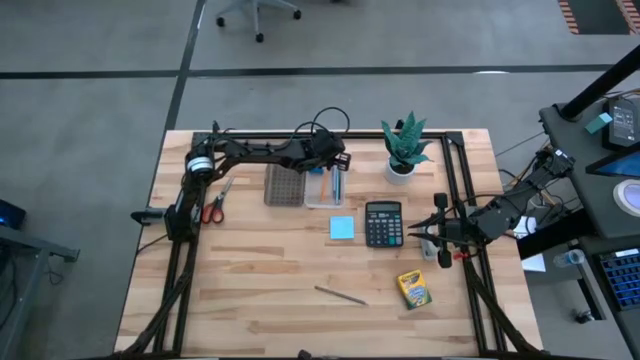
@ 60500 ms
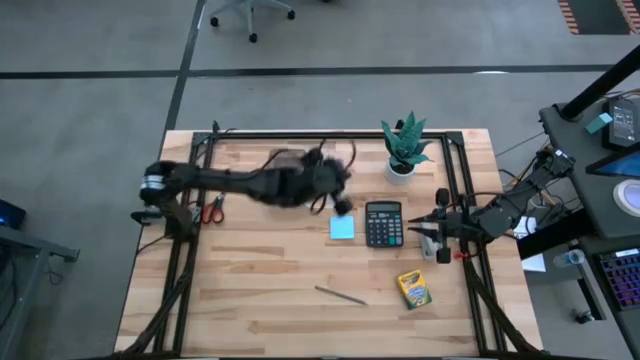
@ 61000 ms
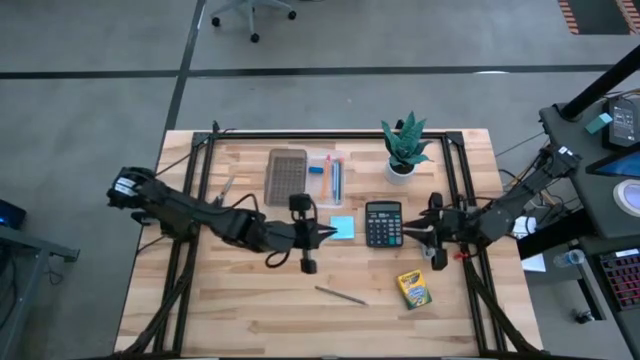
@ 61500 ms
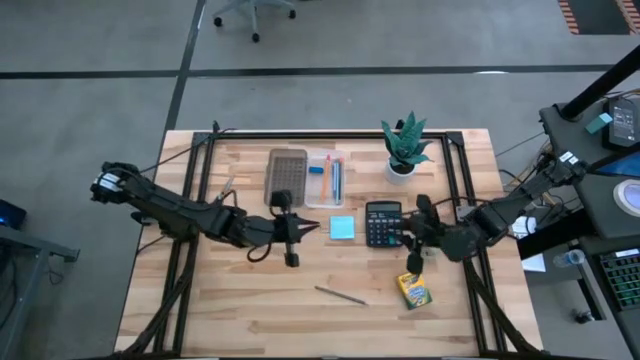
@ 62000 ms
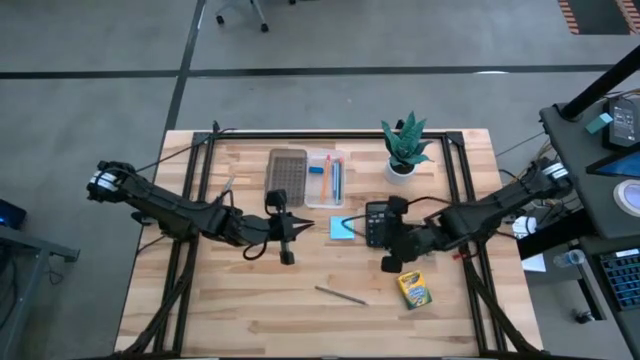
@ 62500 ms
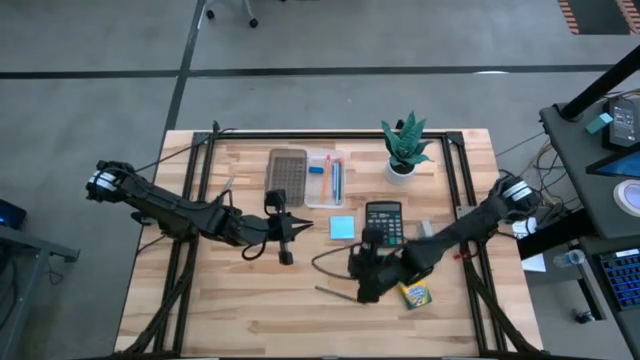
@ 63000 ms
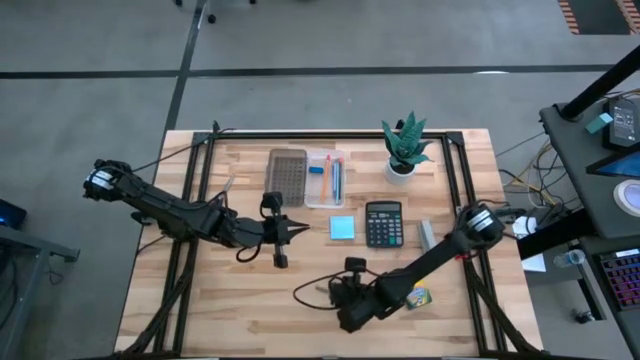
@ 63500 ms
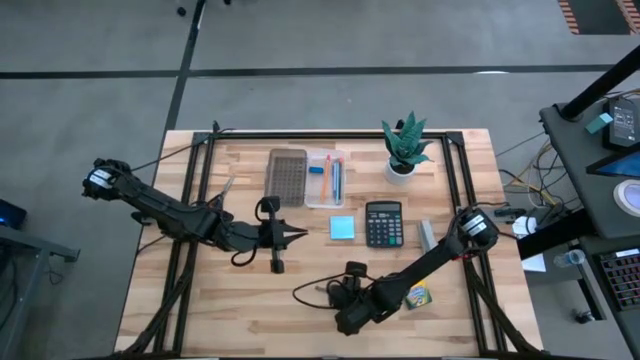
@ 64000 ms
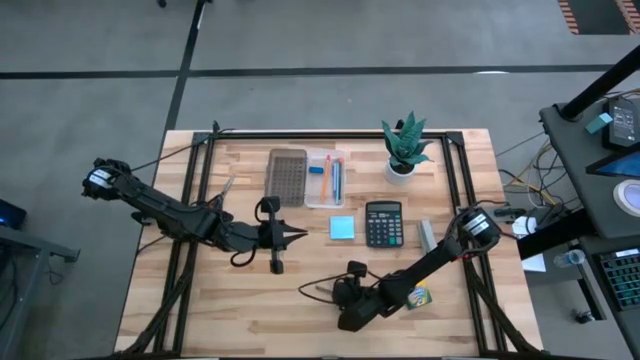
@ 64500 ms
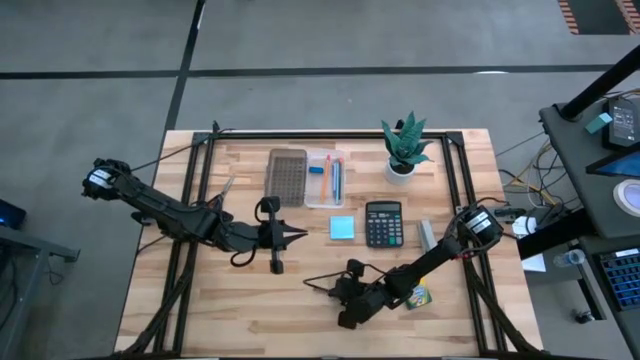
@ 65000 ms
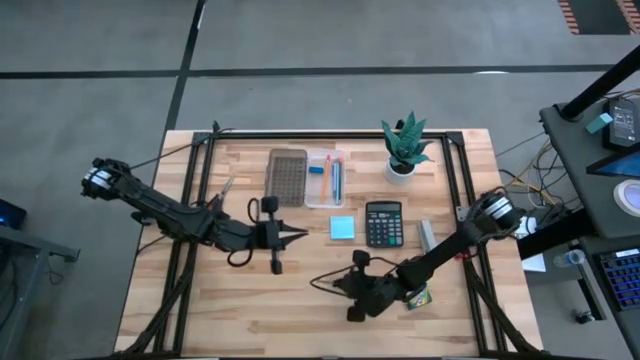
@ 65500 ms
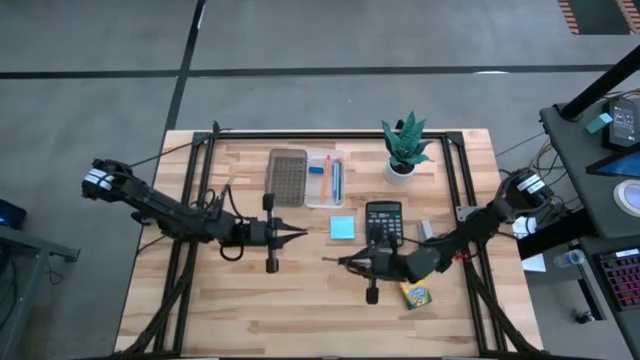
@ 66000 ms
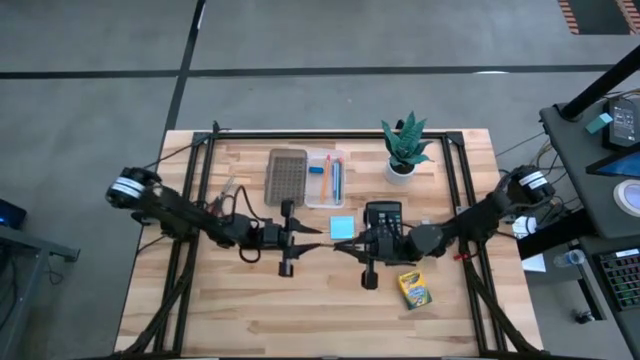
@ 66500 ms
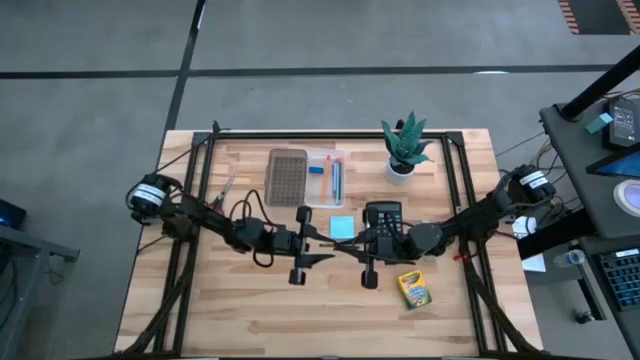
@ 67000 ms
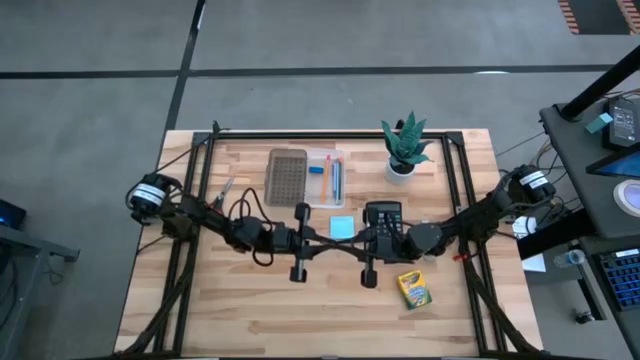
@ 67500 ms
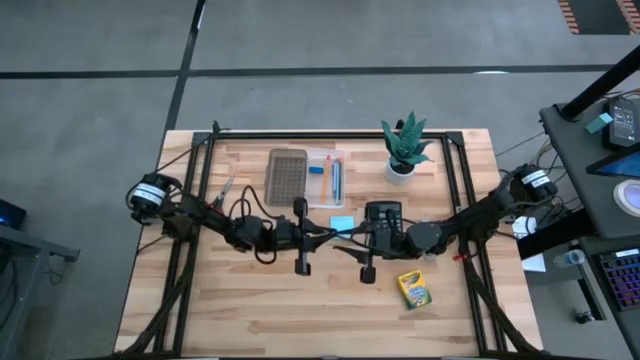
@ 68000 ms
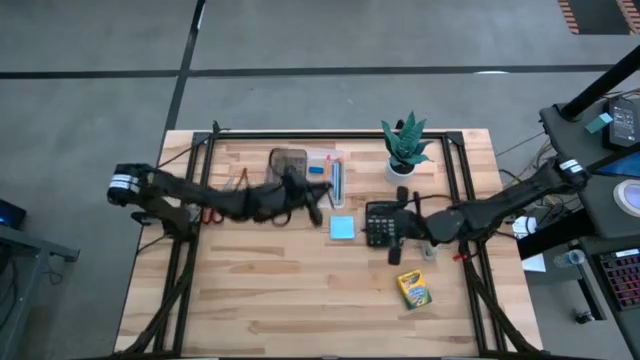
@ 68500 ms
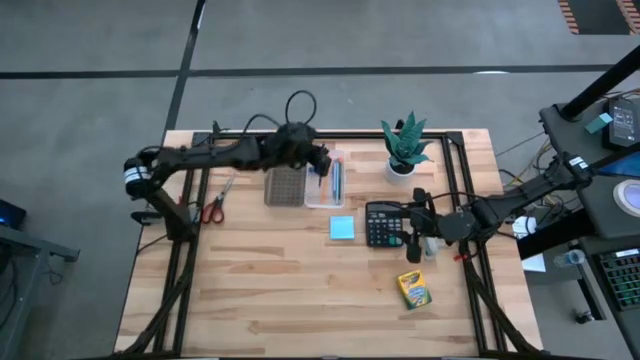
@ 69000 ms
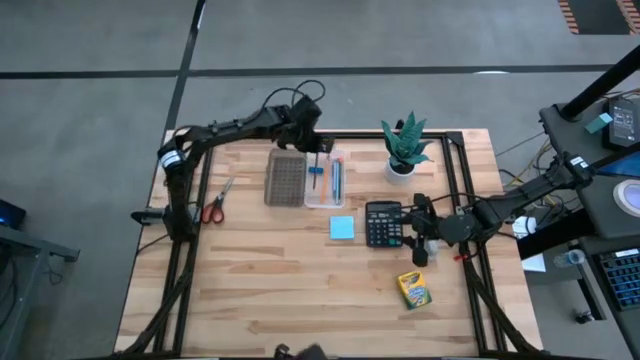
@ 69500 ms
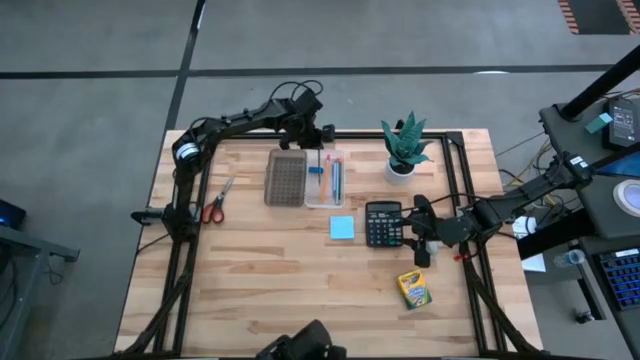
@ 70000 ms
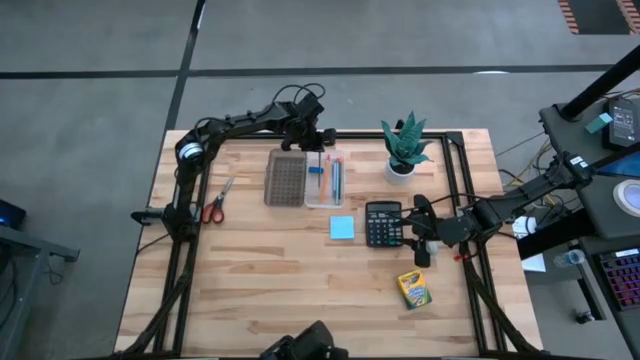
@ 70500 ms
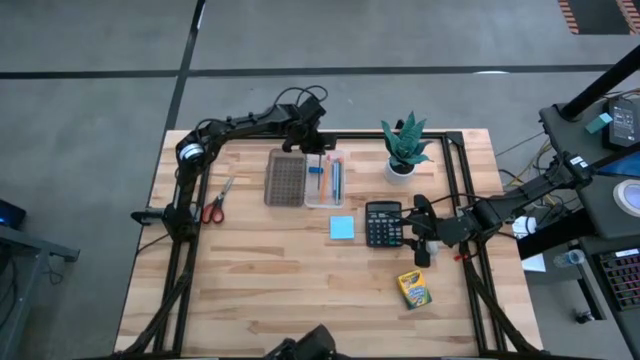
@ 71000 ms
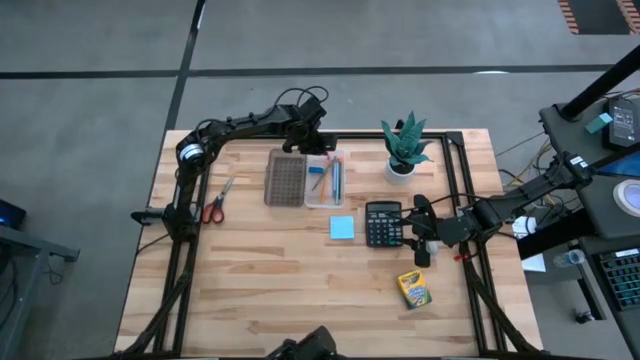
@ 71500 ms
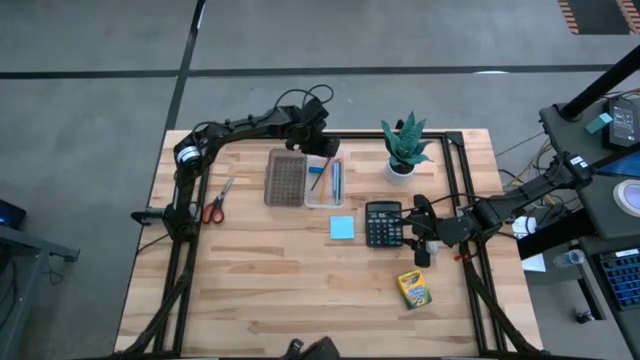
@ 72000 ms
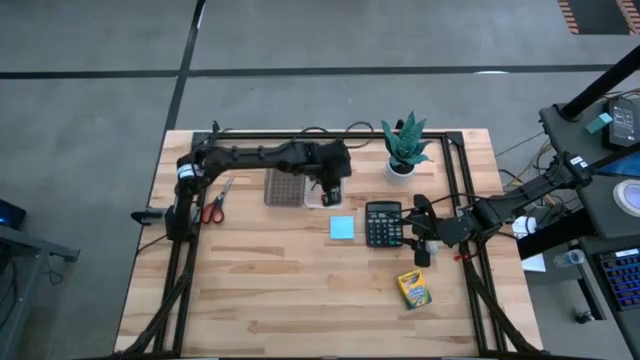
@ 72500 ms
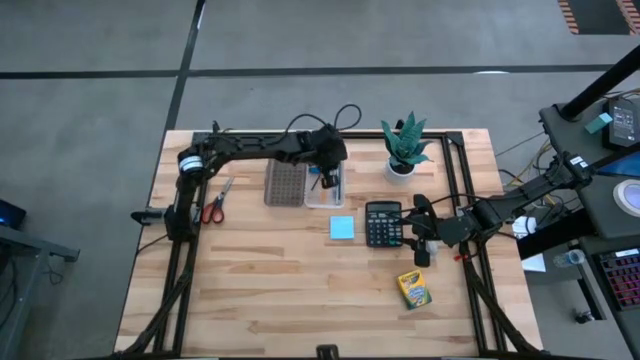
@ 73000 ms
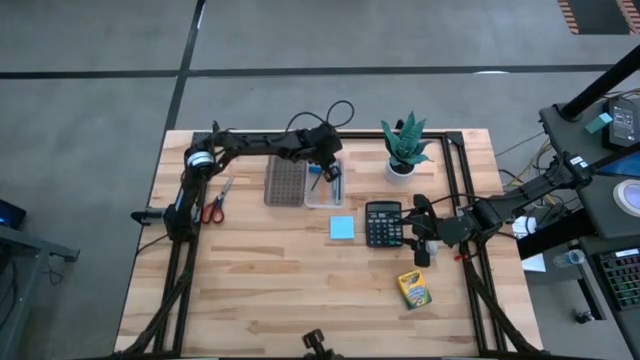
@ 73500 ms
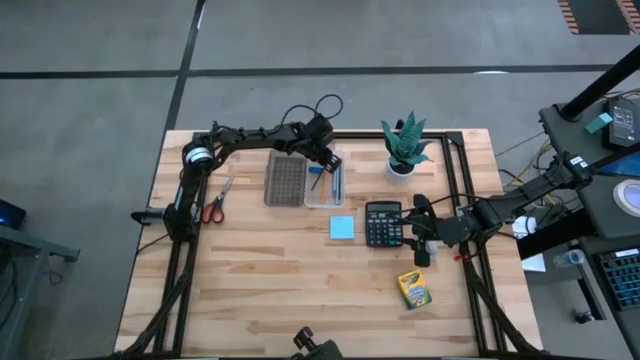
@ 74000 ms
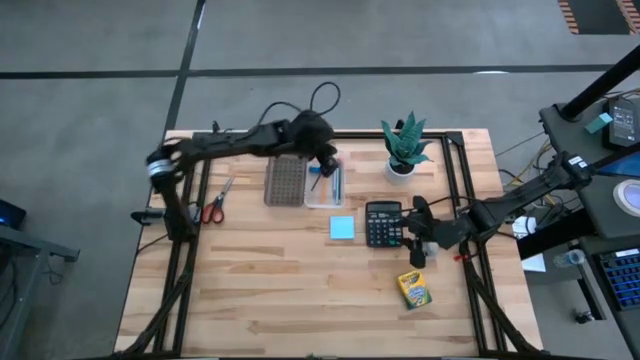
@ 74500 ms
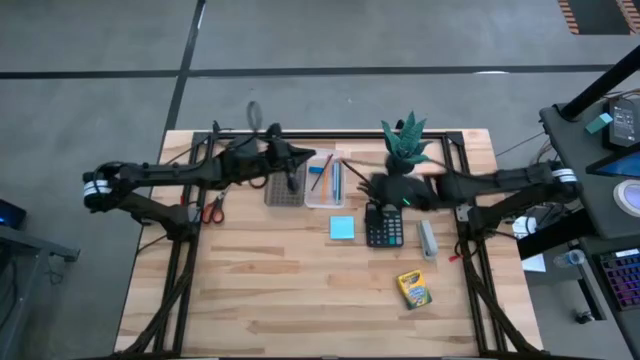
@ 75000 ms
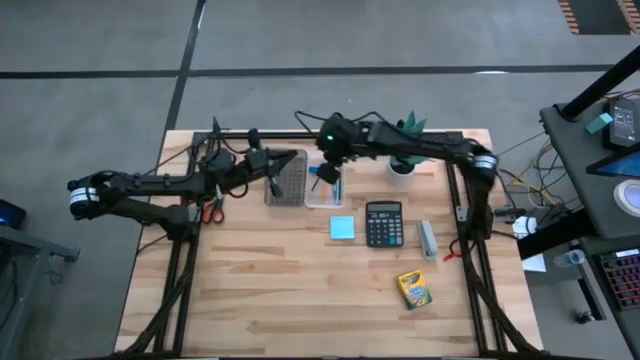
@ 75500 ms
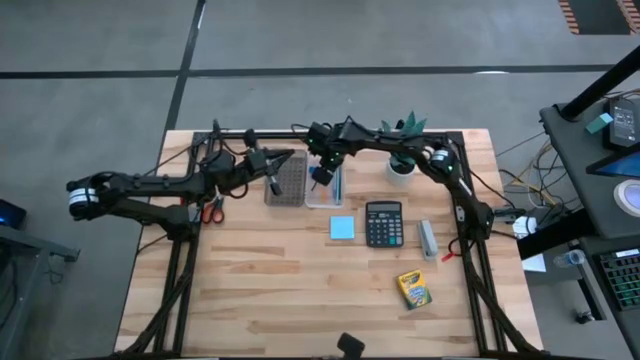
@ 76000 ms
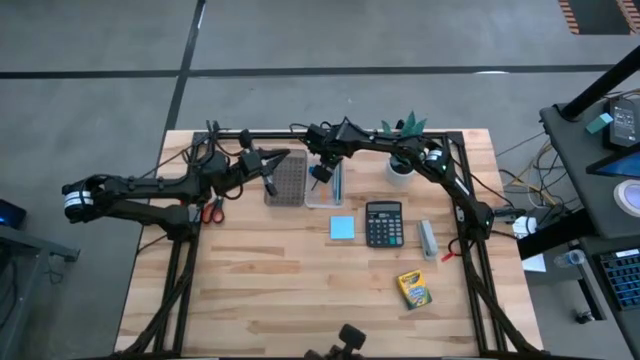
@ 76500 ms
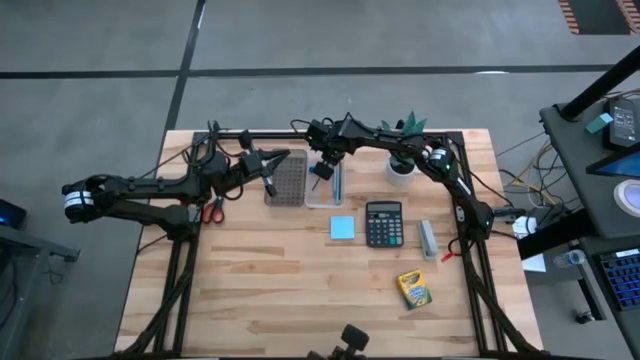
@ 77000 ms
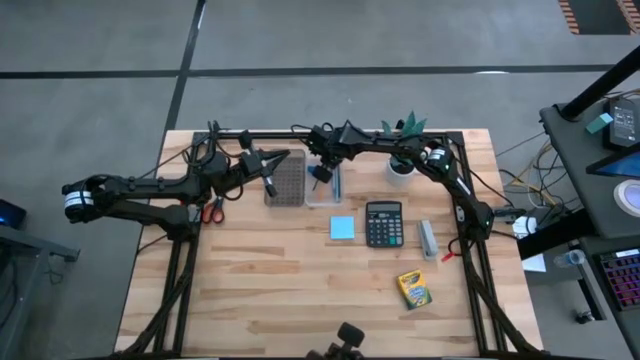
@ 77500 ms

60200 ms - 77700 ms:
Task: Pack school essentials
Put the blue pencil into the transparent supply box

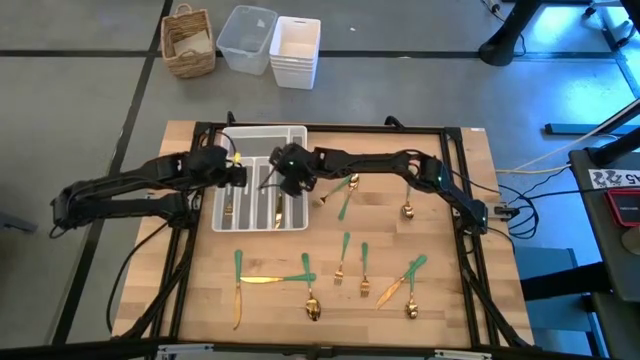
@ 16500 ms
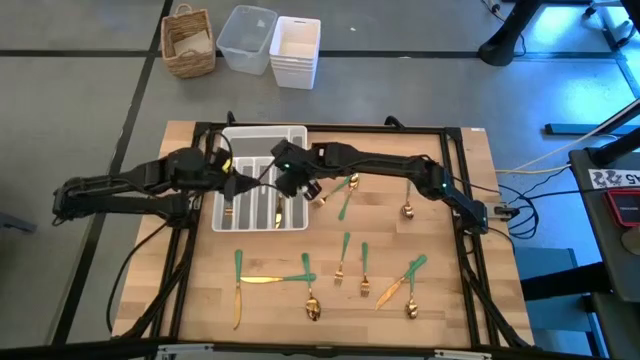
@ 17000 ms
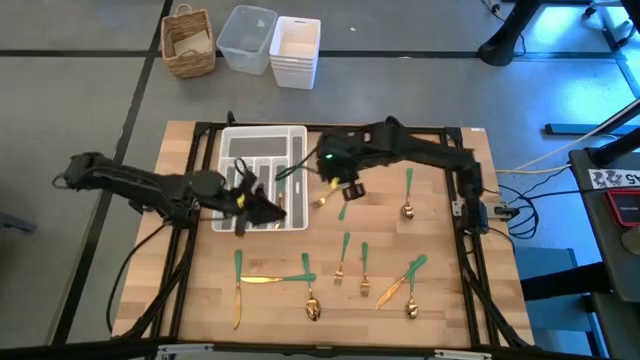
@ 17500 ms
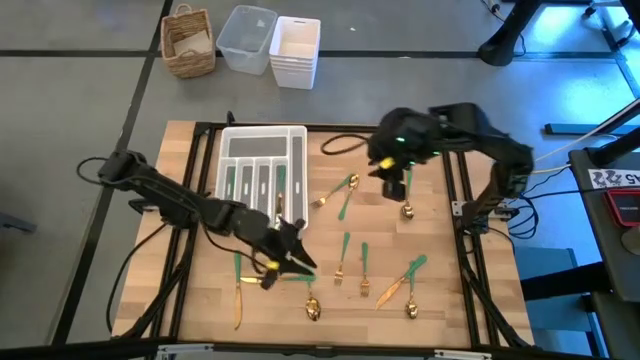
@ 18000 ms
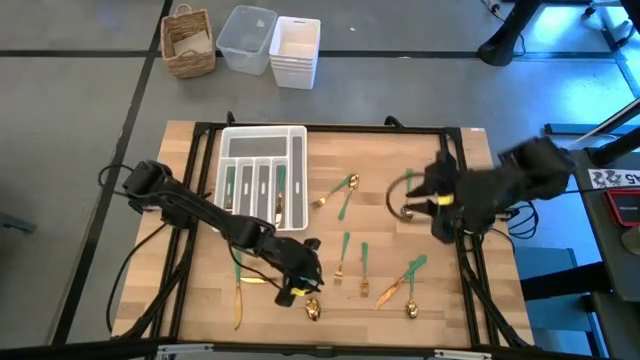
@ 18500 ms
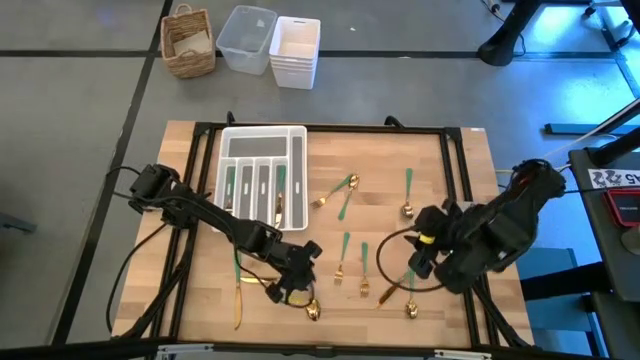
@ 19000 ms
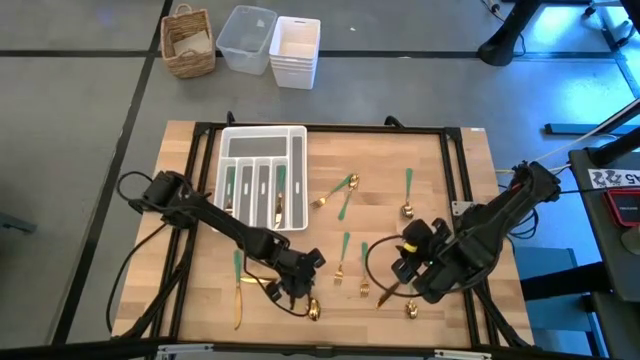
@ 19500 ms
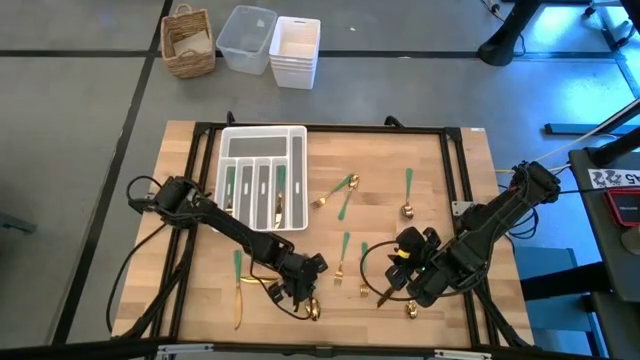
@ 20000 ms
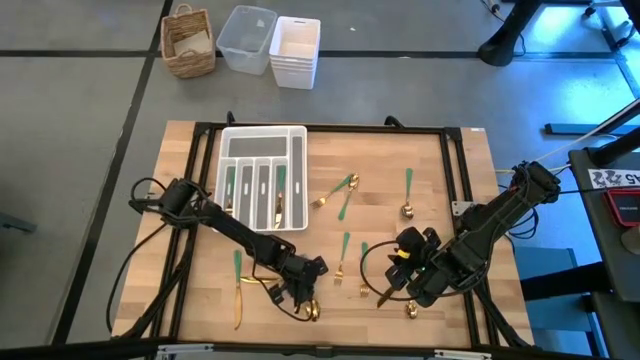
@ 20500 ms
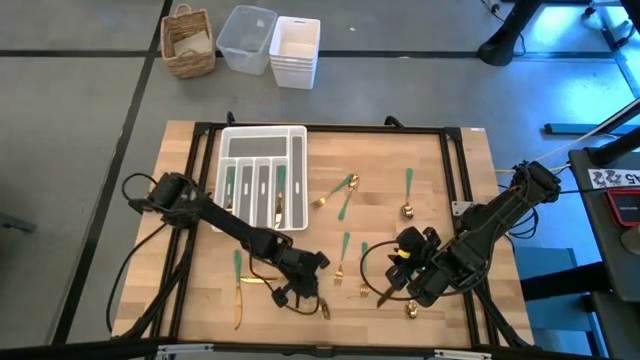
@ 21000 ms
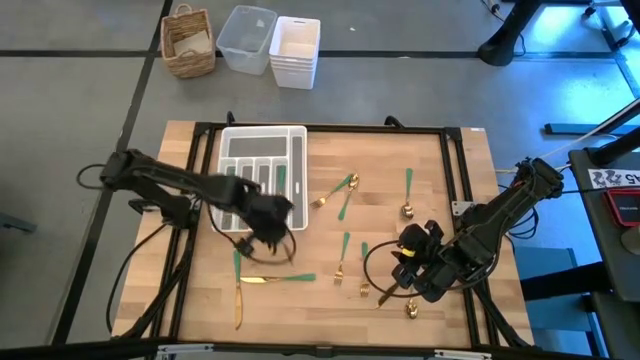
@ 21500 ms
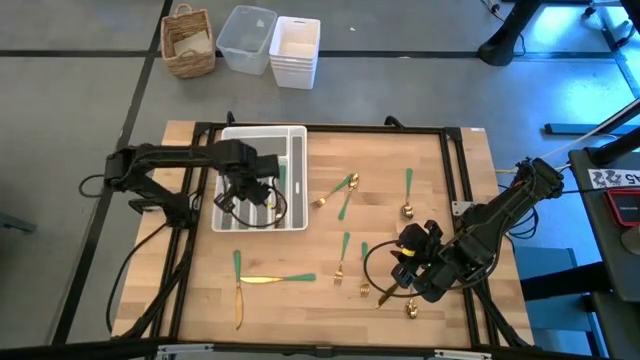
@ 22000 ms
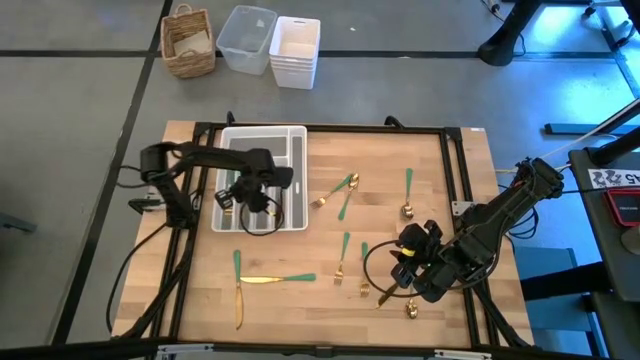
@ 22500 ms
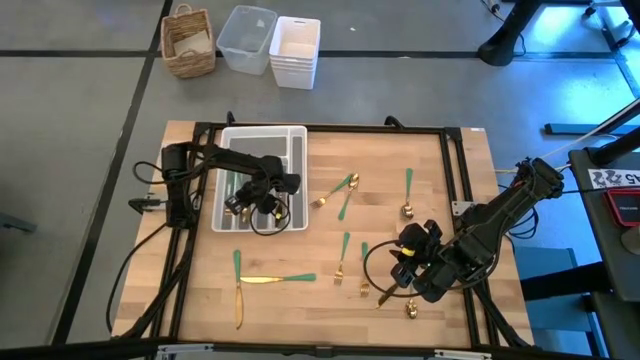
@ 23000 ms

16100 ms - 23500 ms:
Task: Sort silverware
Put the green spoon into the white silverware tray
